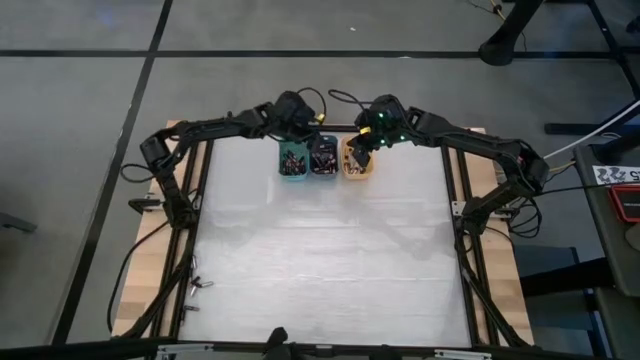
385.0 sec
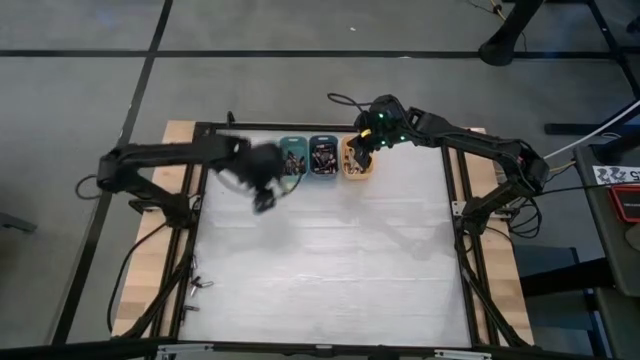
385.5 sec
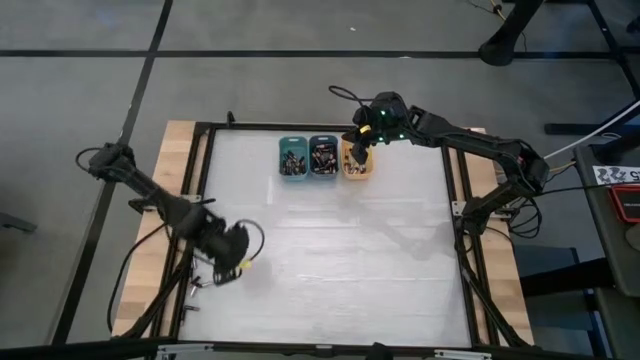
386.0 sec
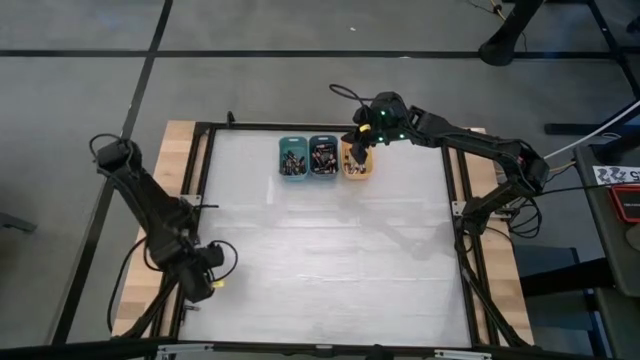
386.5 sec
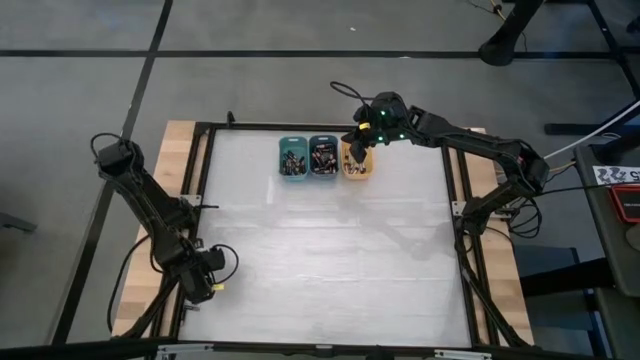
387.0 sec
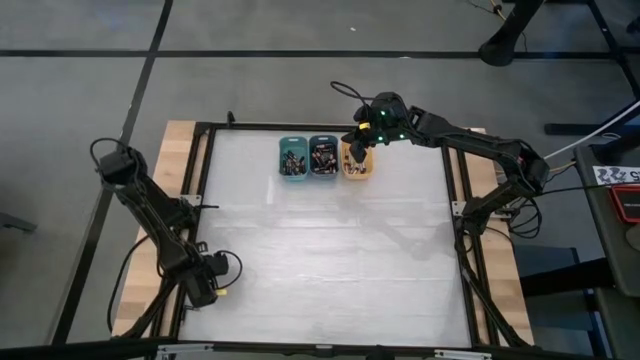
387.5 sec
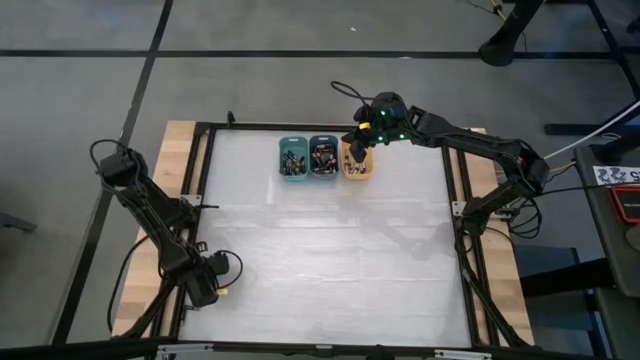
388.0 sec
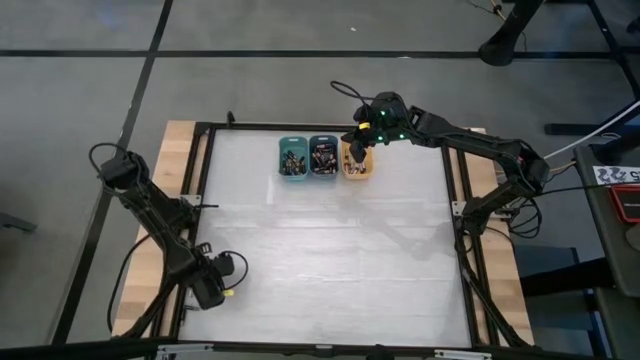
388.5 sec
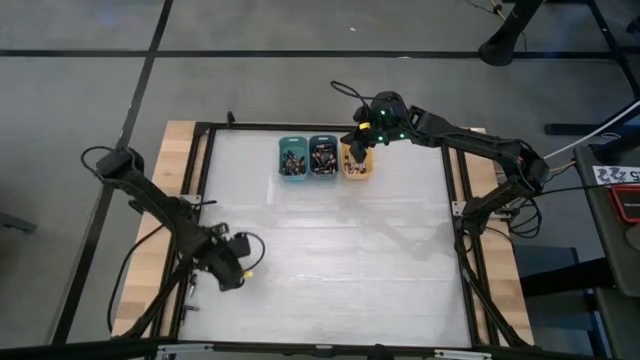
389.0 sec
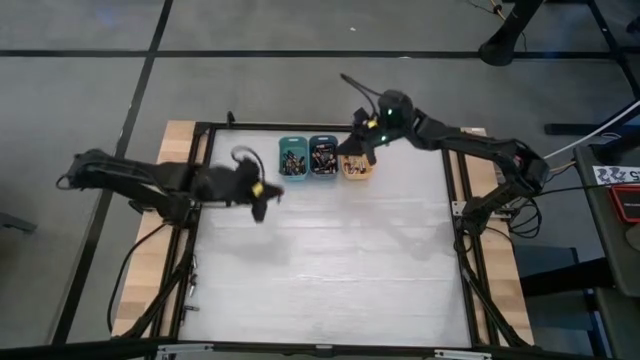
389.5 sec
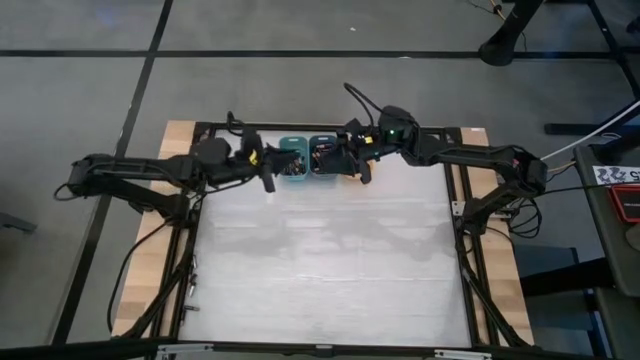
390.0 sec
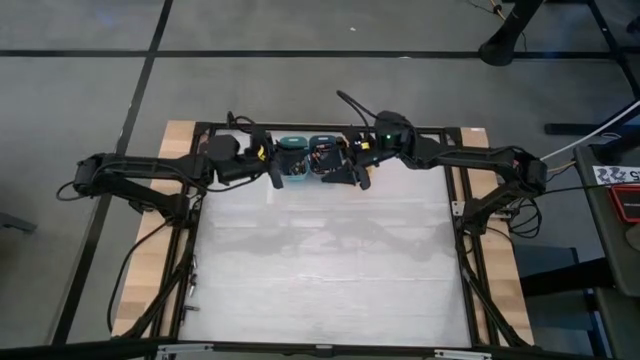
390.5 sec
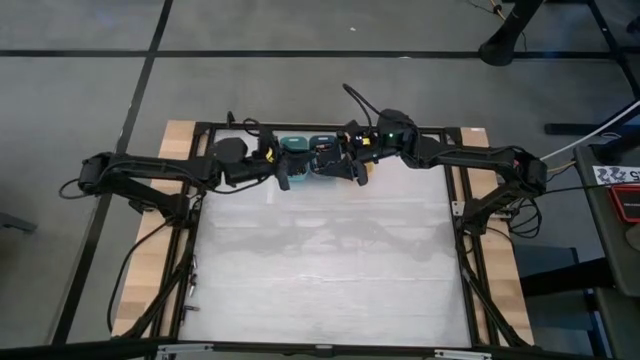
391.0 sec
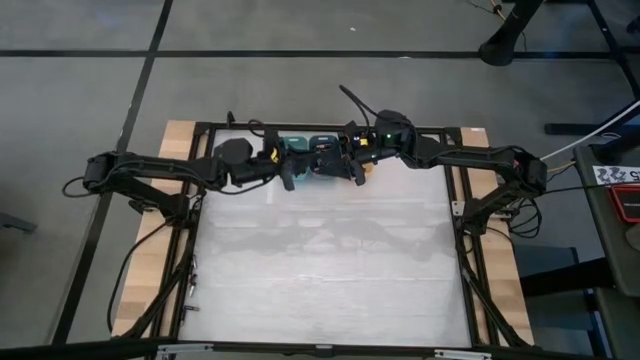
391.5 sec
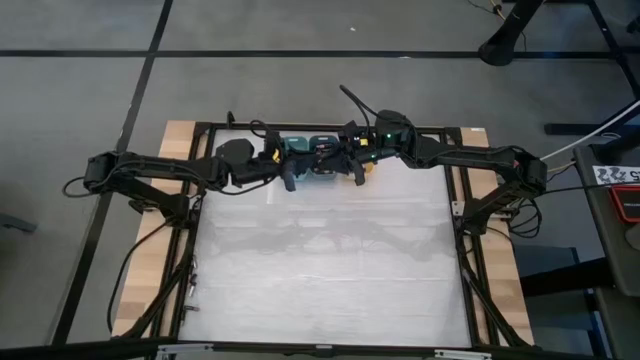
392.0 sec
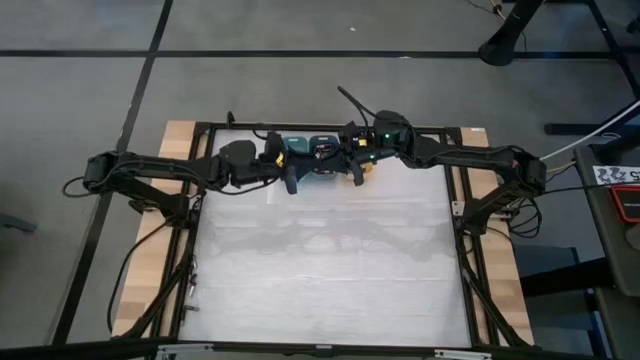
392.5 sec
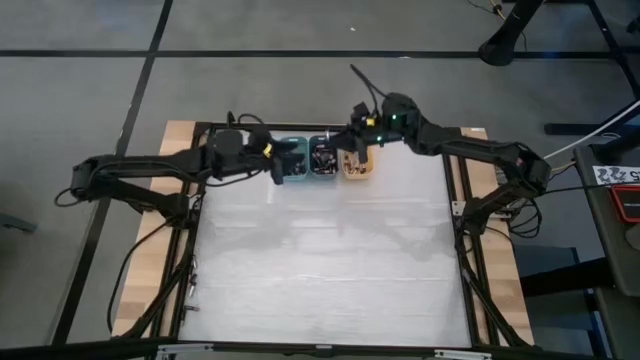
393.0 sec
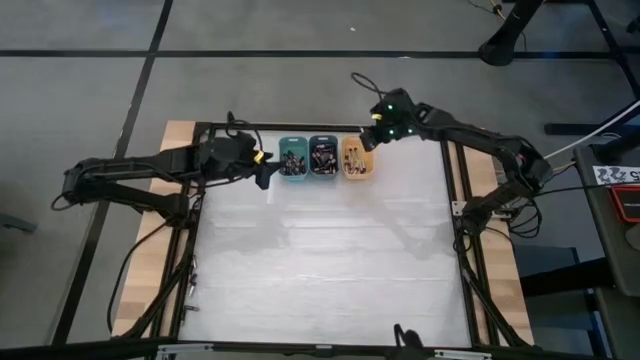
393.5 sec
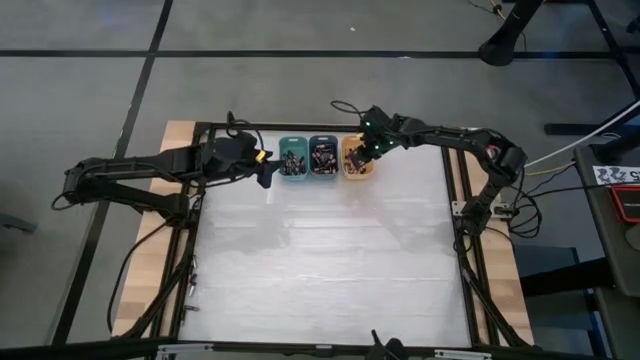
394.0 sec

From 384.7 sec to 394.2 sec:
Task: Sort batteries
Put the silver battery into the yellow bin

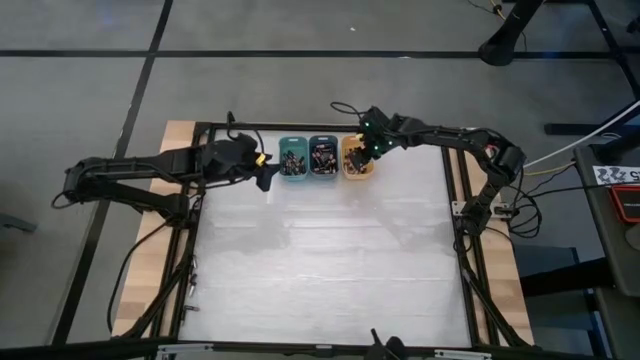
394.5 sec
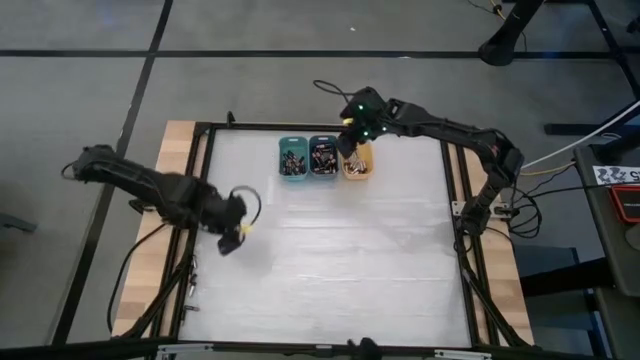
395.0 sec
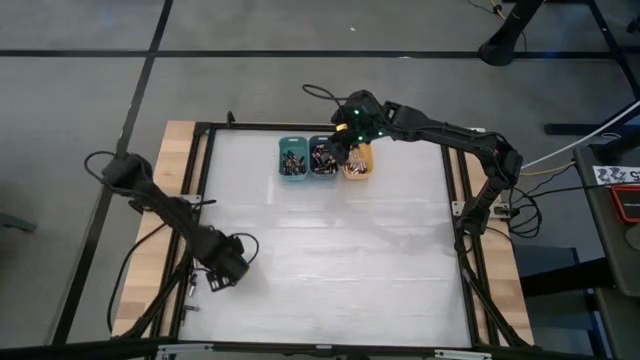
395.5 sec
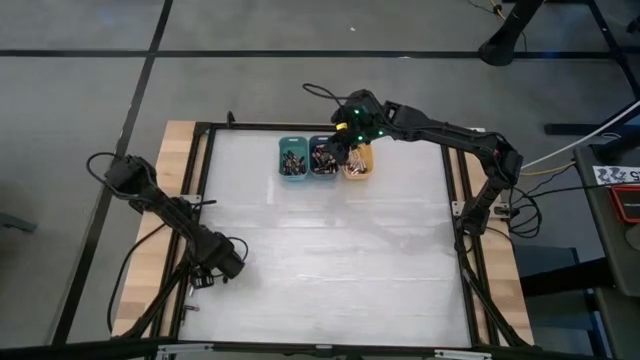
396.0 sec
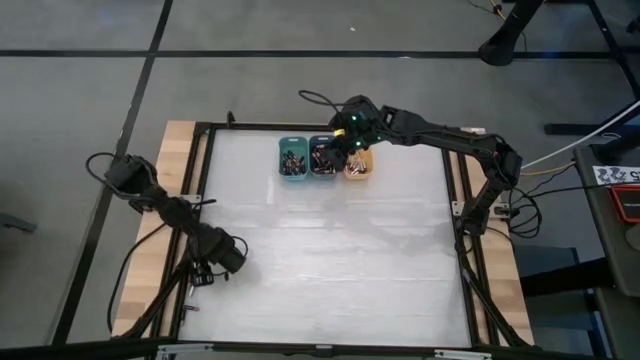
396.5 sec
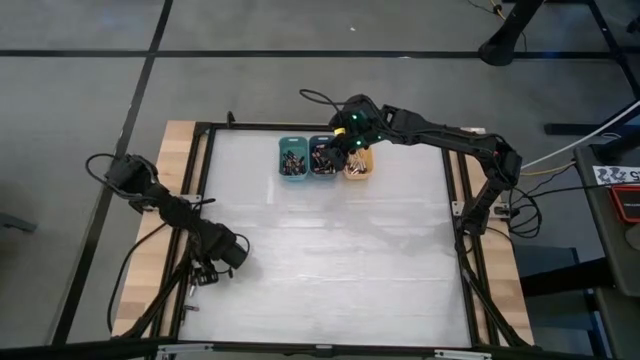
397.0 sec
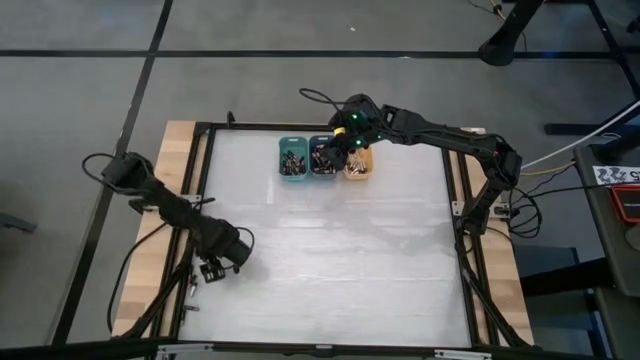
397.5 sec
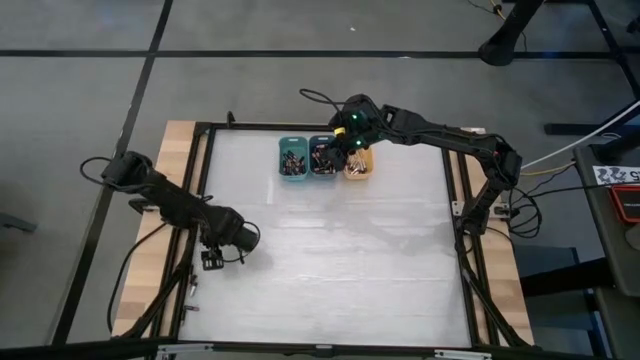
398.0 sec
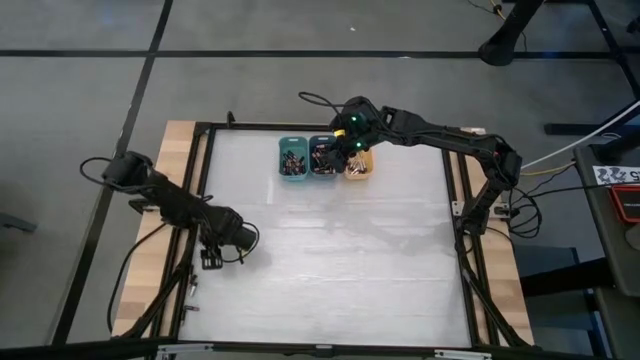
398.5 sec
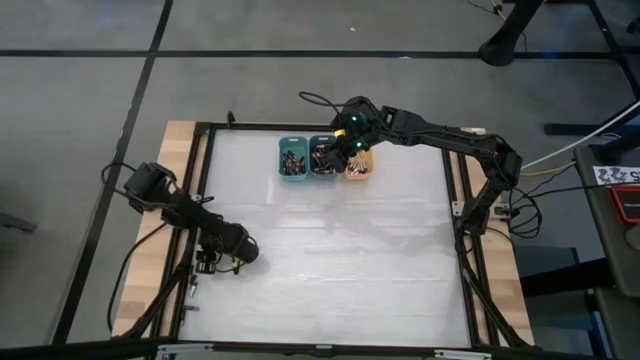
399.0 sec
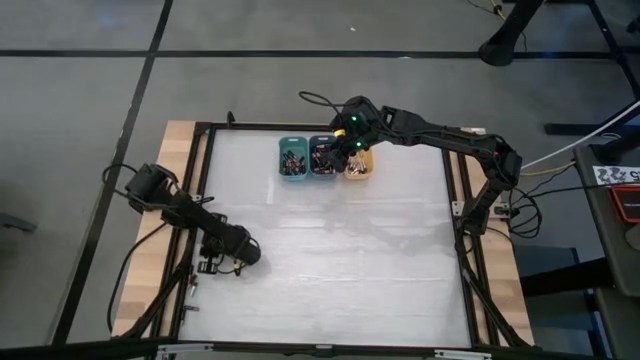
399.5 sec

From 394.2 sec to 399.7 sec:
Put the silver battery into the yellow bin

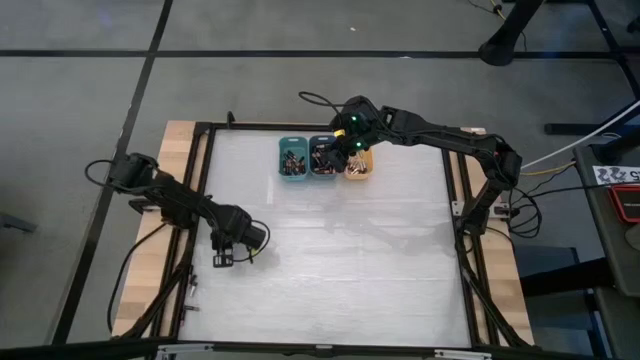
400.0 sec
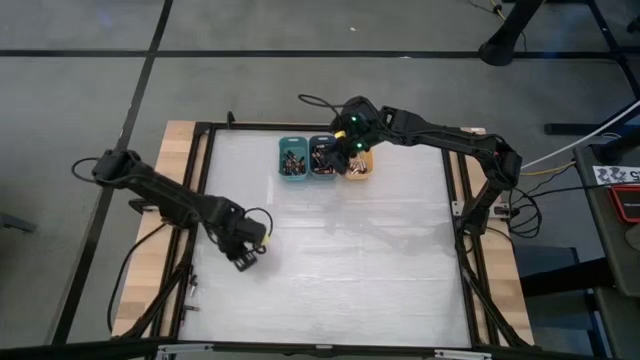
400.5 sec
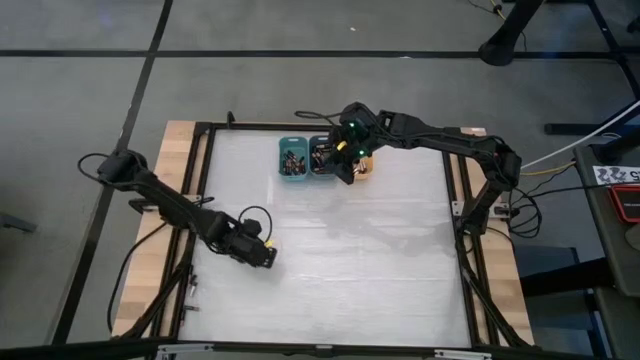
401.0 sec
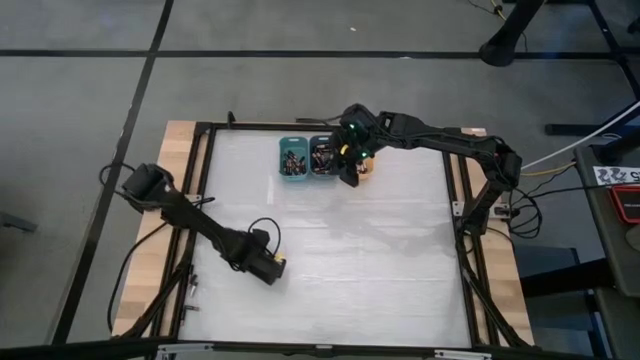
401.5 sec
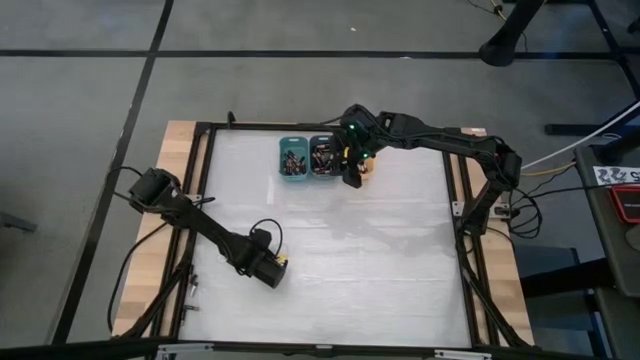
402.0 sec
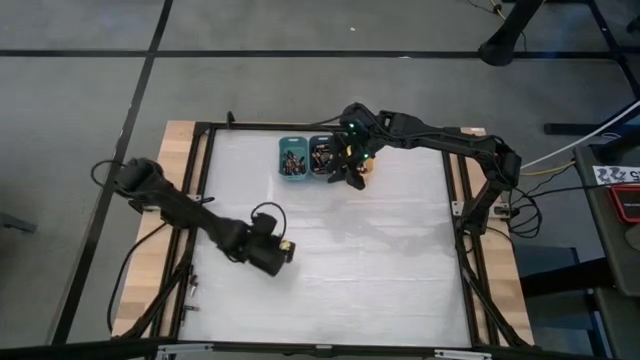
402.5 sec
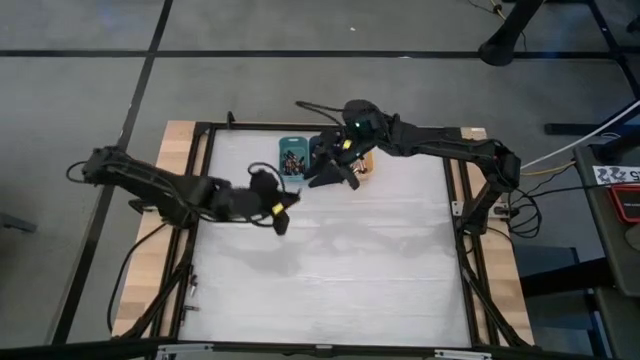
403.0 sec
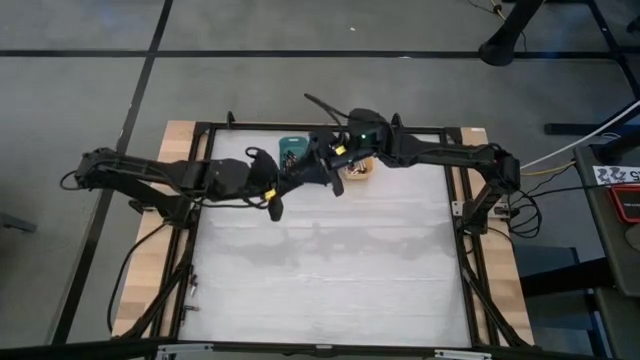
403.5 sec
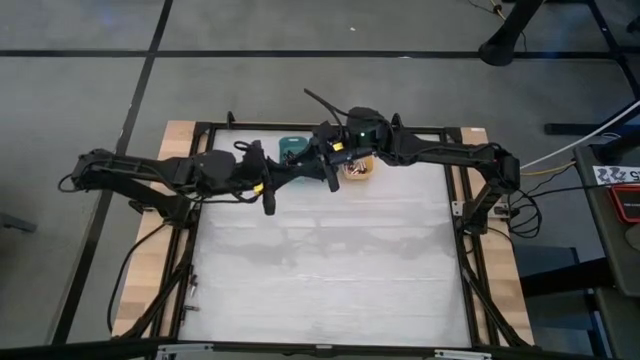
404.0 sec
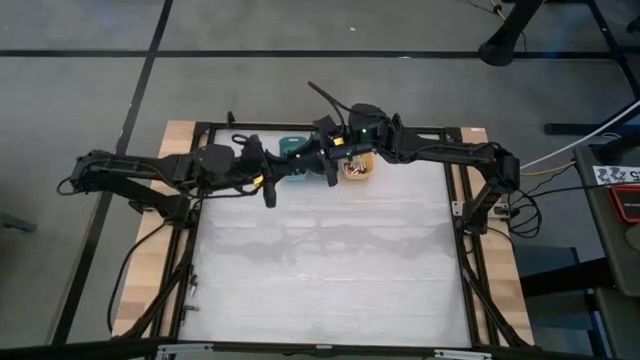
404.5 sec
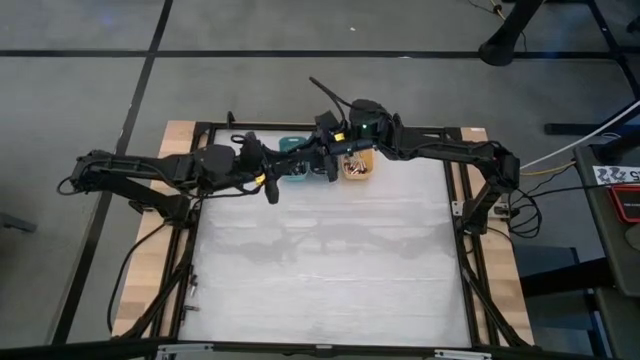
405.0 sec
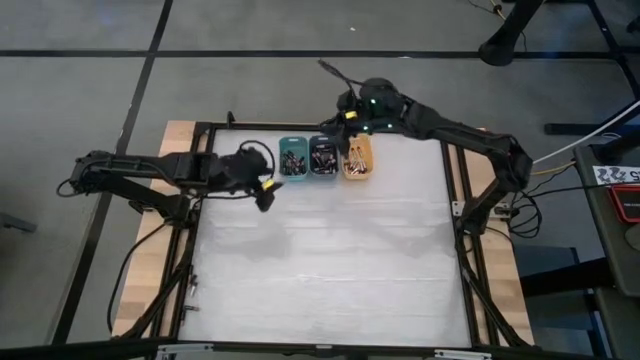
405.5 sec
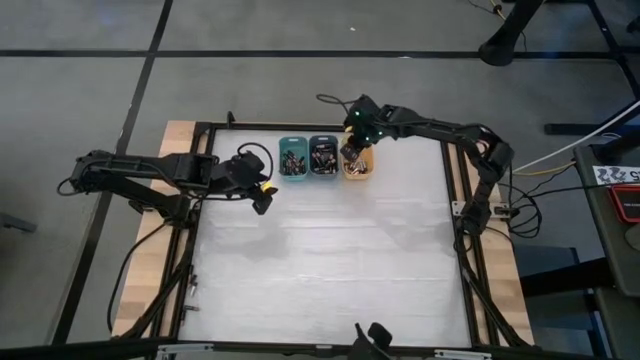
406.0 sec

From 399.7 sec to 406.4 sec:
Put the silver battery into the yellow bin
